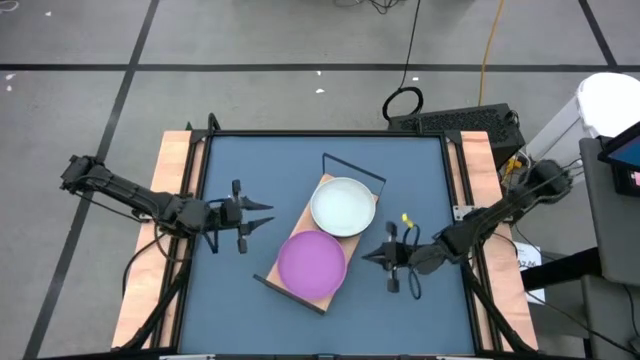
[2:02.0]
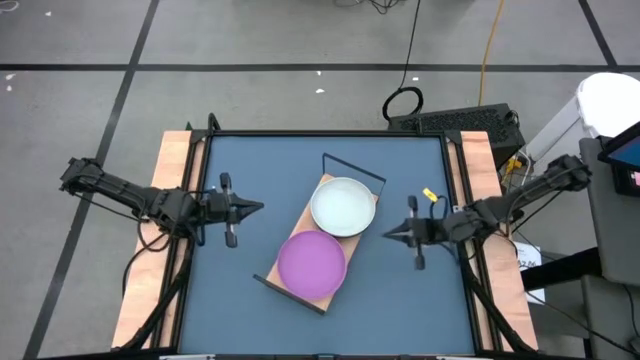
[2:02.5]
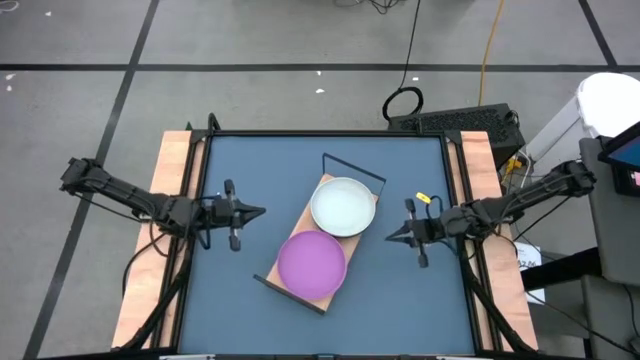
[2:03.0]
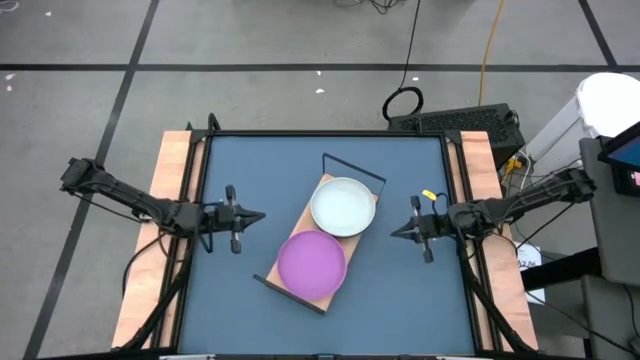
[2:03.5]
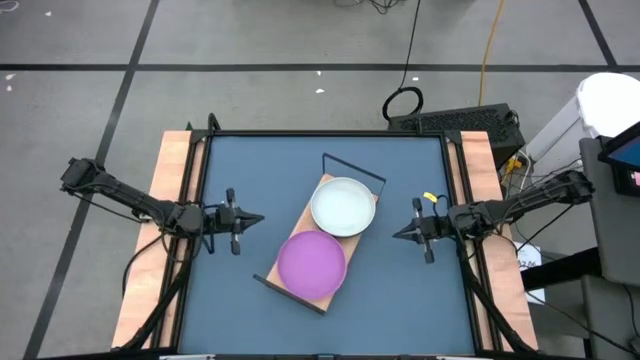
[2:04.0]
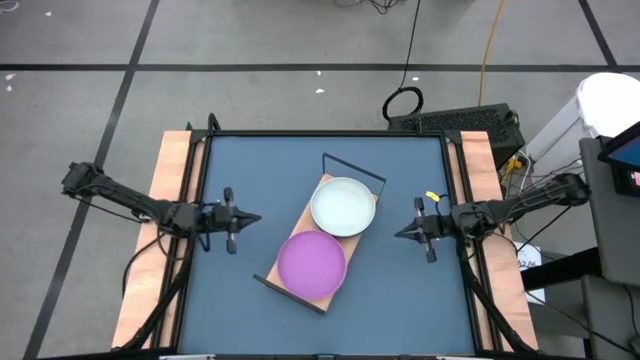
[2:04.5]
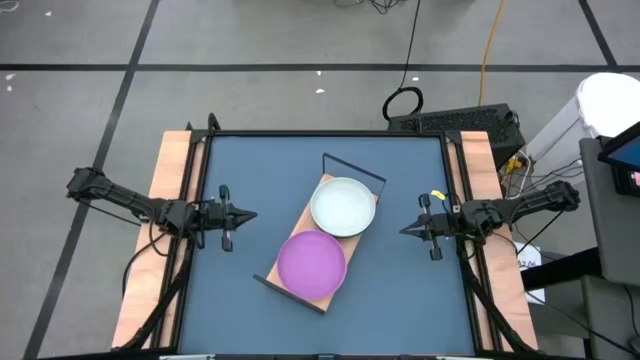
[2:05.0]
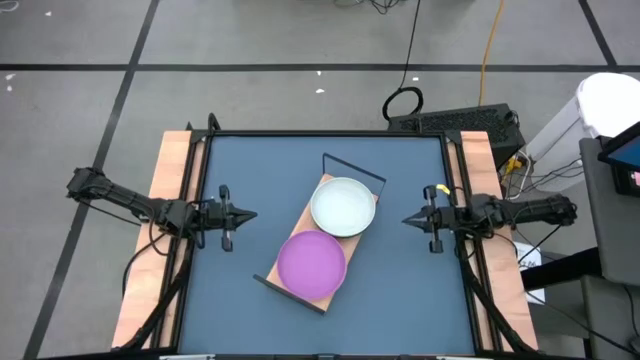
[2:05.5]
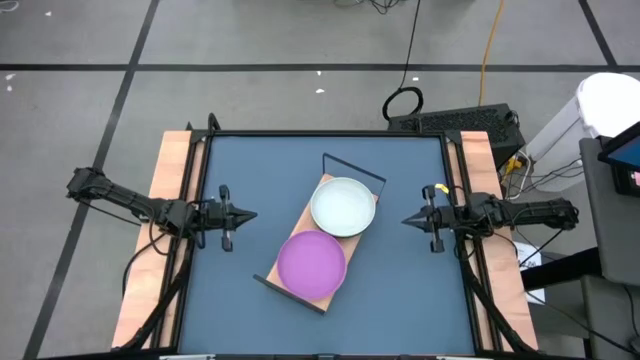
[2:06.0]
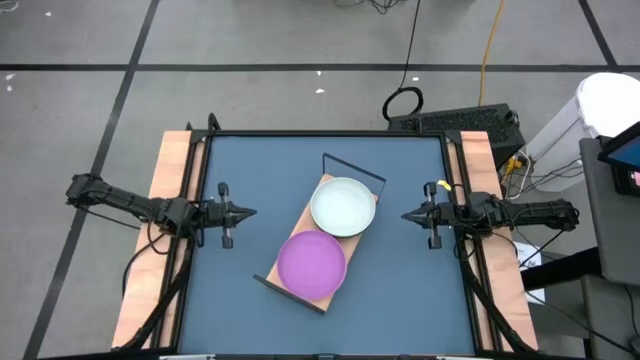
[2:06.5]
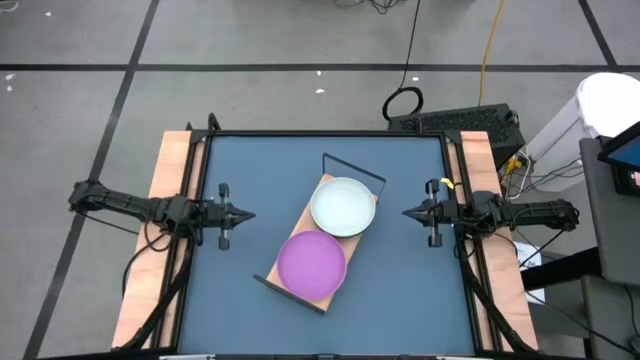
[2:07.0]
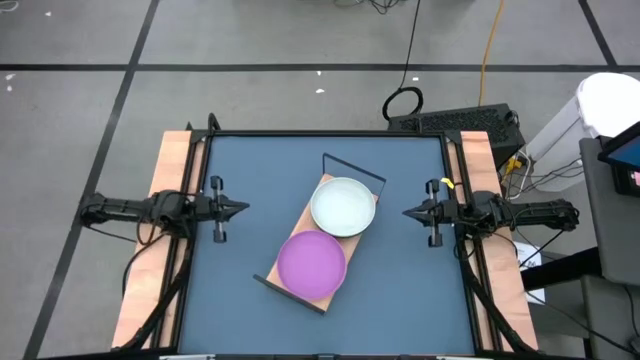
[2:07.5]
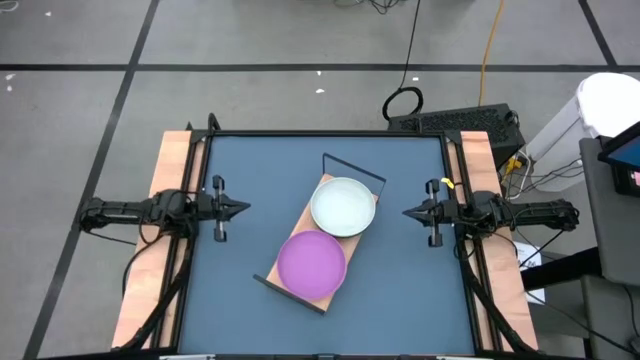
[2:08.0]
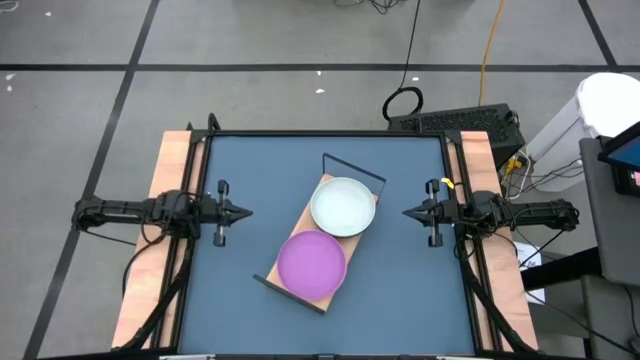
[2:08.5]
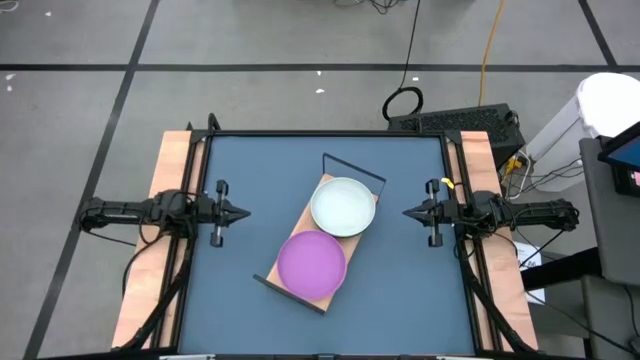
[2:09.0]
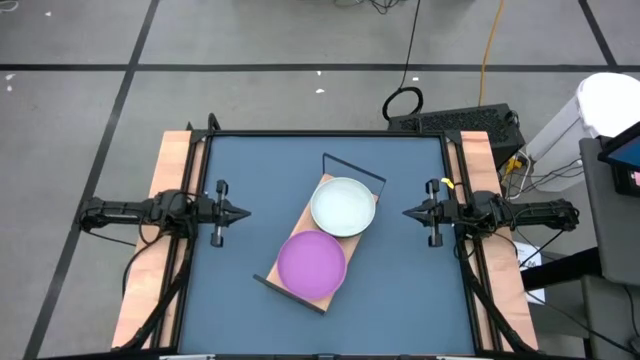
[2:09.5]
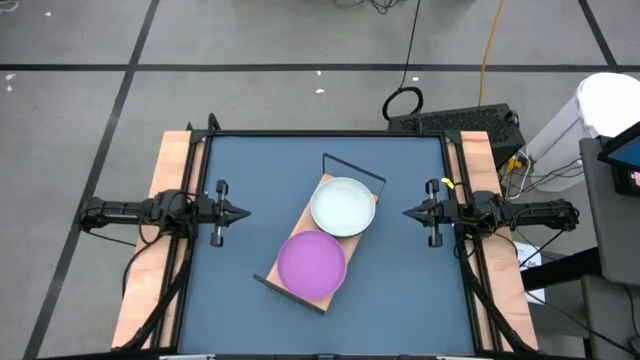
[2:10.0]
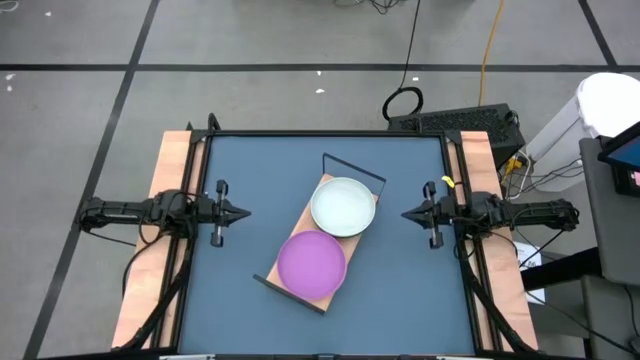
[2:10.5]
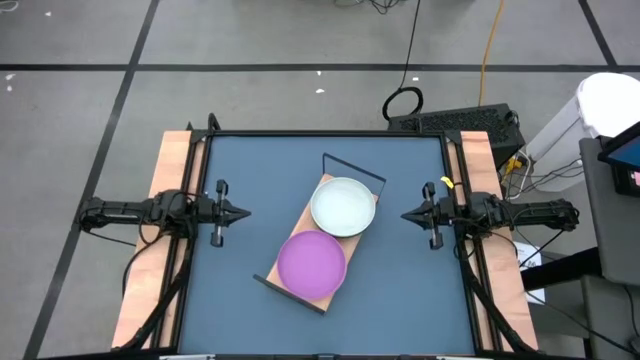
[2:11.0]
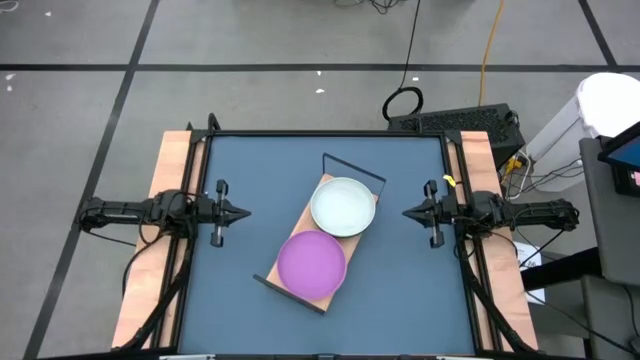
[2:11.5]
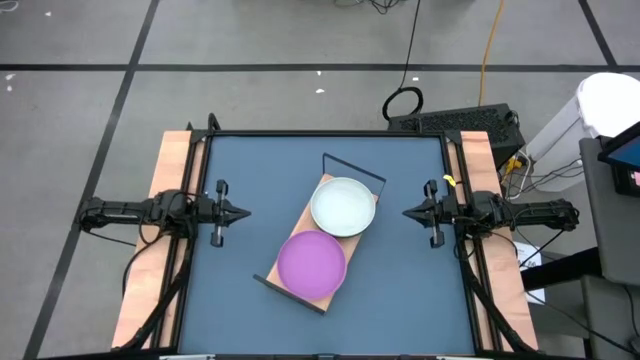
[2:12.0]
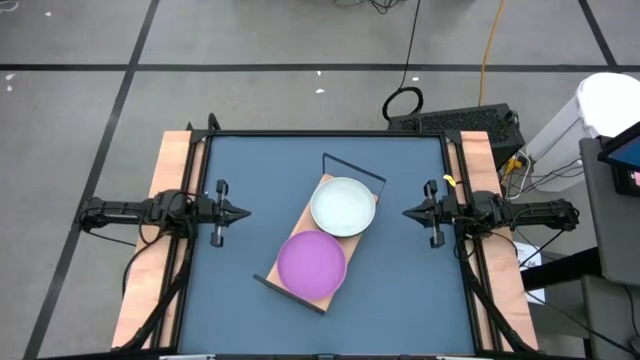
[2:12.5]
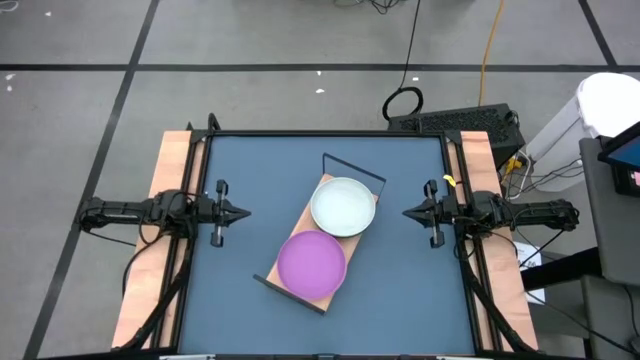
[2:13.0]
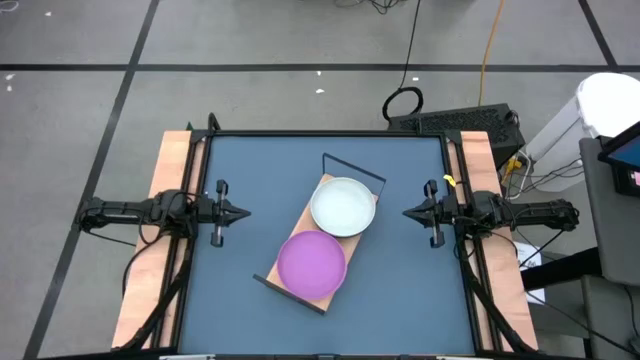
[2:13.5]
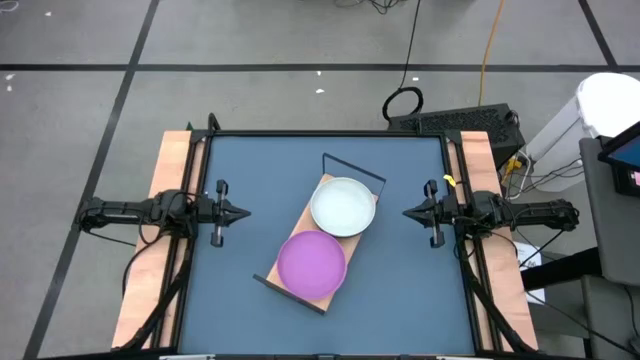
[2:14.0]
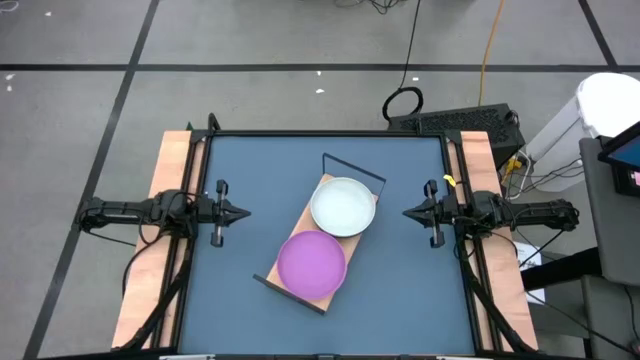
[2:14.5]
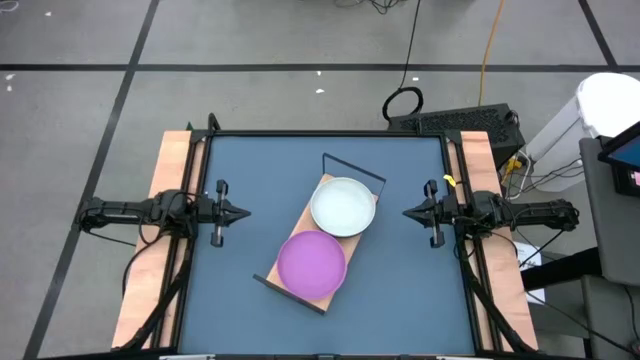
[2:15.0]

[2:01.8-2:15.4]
Task: Place and stack plates onto a shelf
Return to Home Position

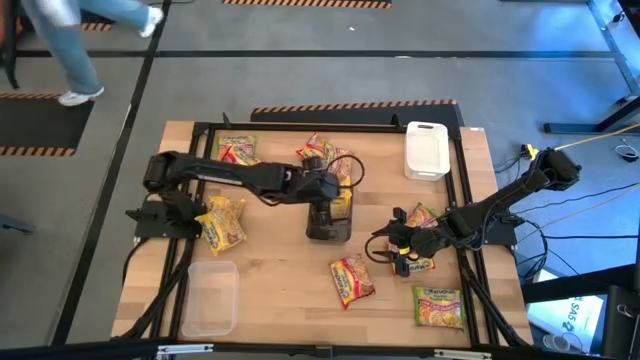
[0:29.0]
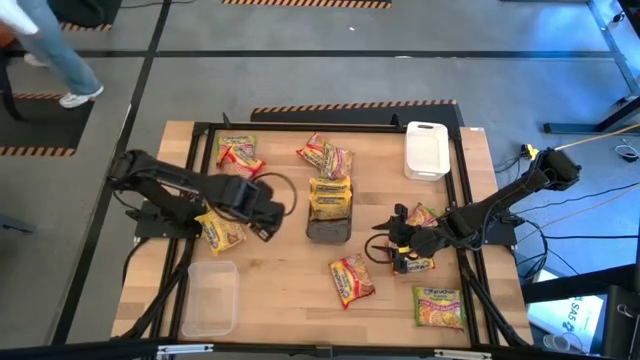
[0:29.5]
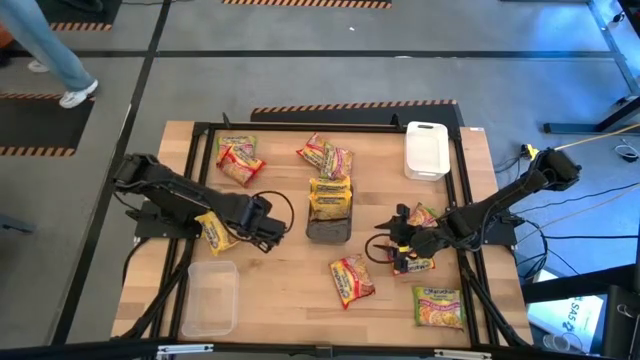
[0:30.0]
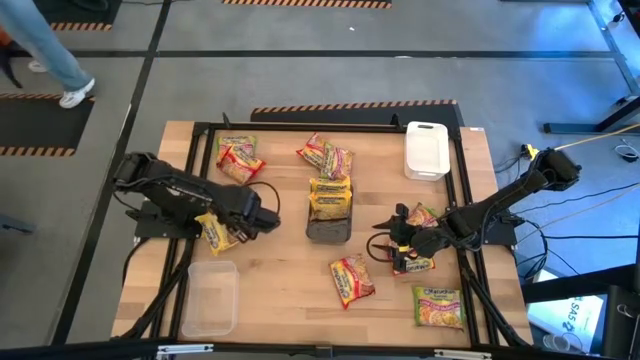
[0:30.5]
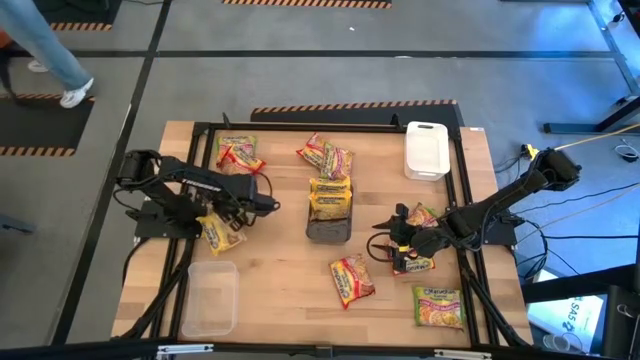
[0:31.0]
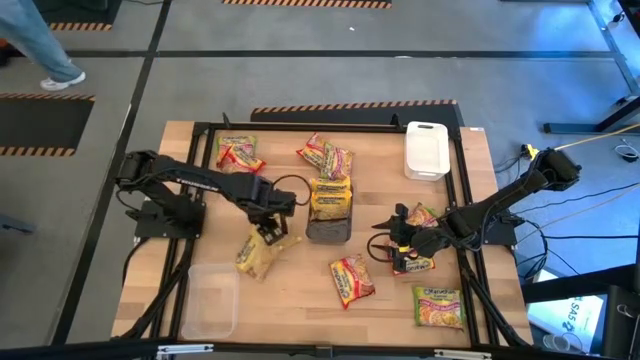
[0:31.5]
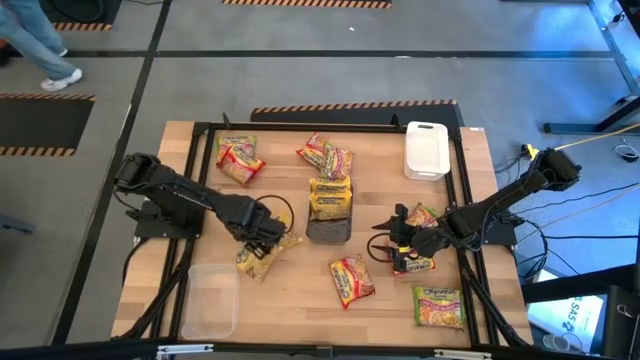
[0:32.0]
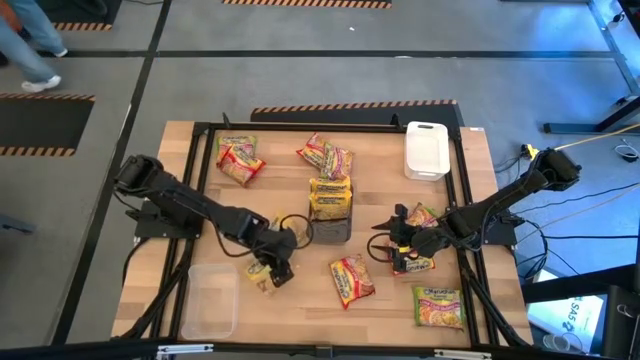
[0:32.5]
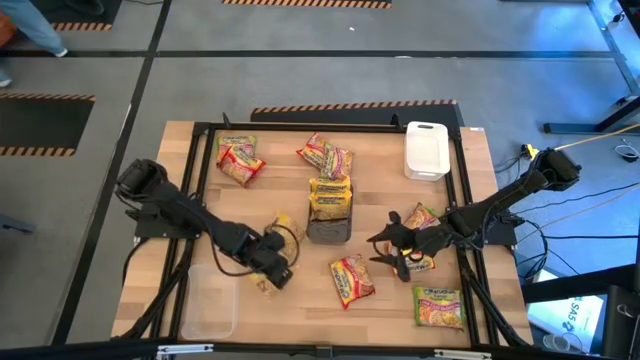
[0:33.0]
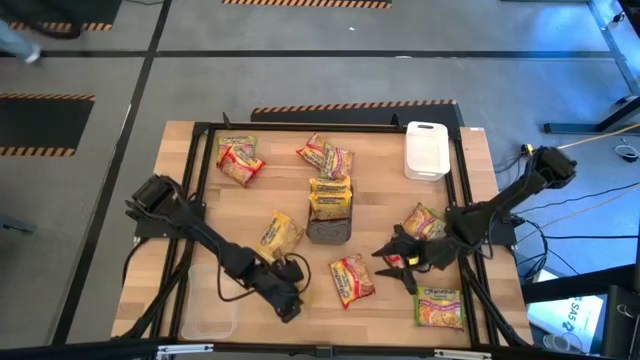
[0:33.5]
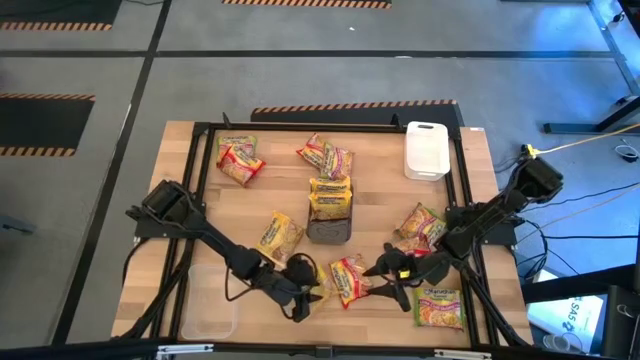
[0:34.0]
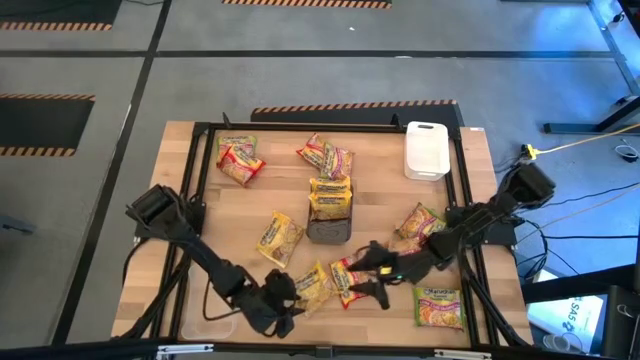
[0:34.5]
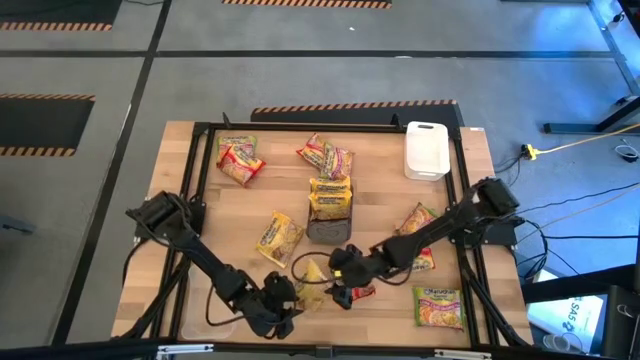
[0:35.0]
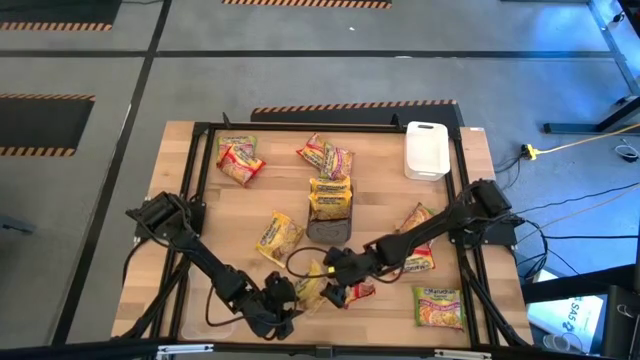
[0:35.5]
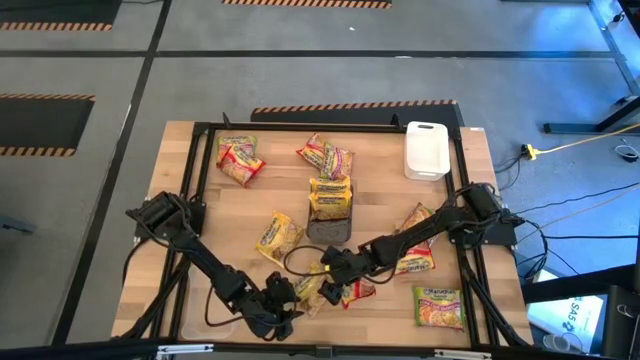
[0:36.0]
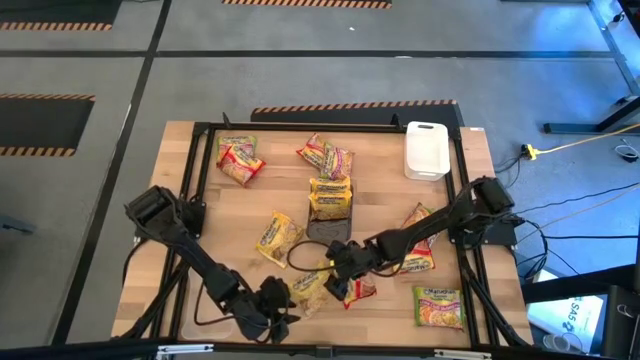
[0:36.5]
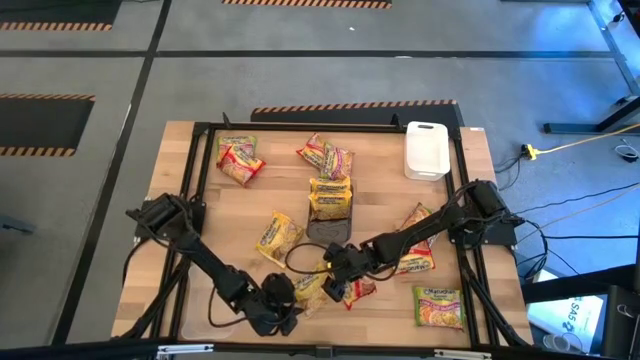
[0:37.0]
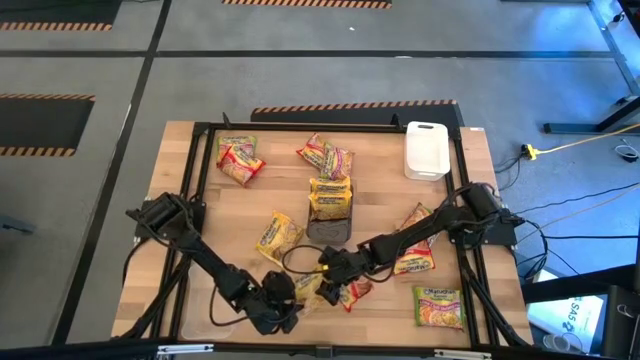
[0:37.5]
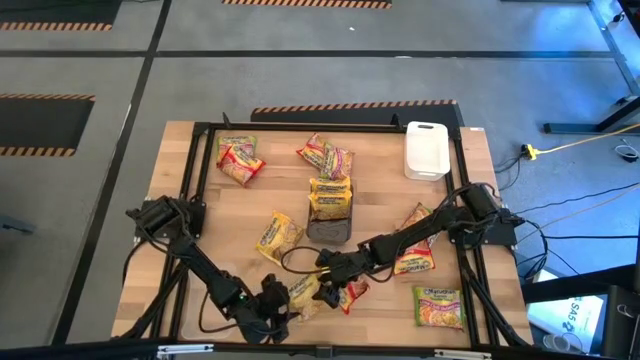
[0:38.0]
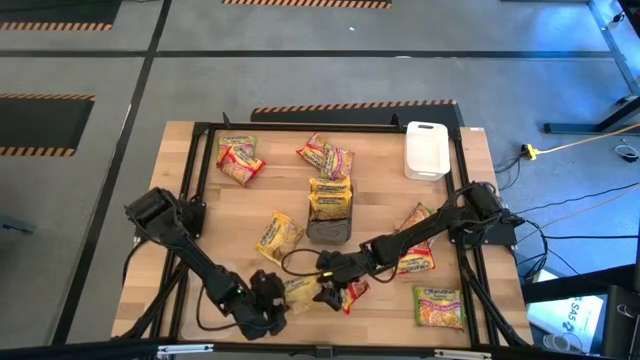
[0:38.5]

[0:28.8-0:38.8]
Task: Sort Maruchan noodles
Put the yellow noodle pack into the black bin
